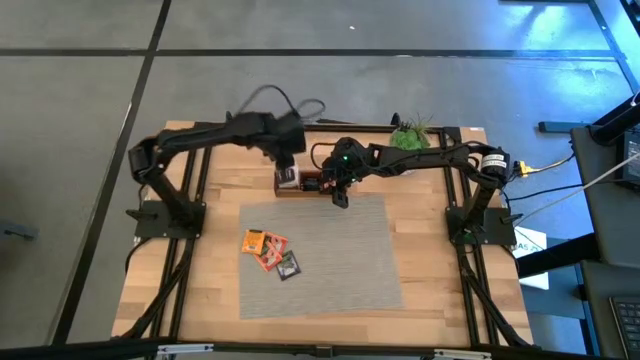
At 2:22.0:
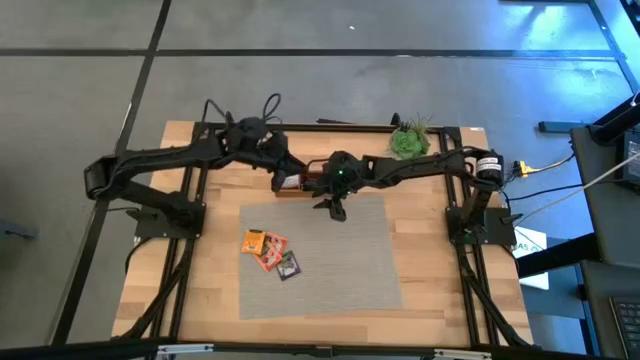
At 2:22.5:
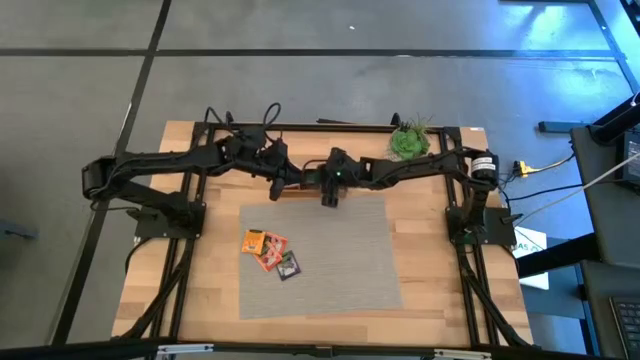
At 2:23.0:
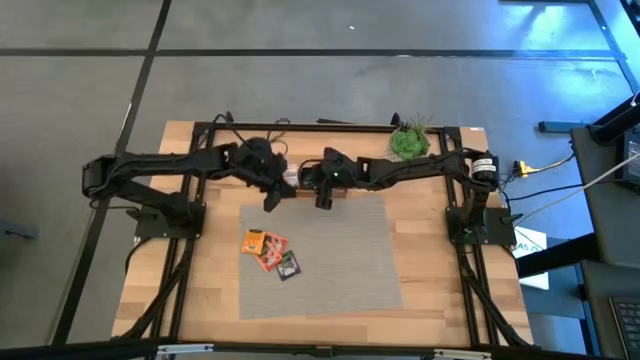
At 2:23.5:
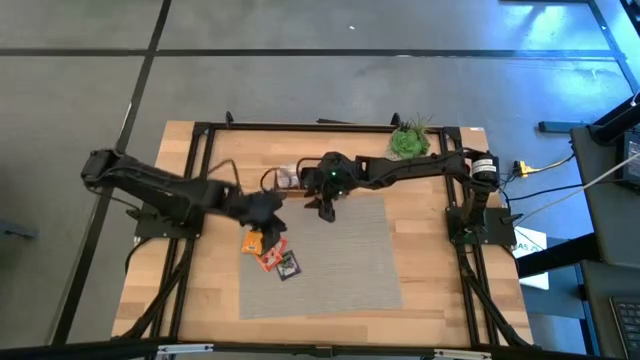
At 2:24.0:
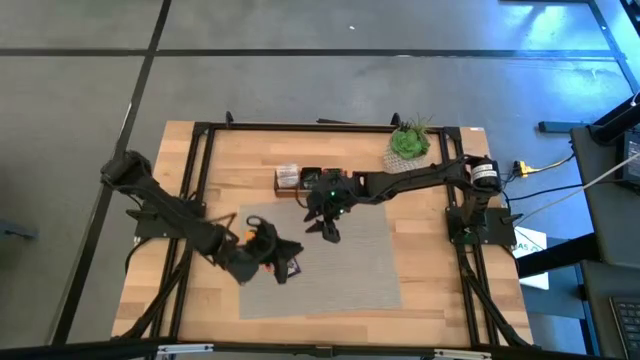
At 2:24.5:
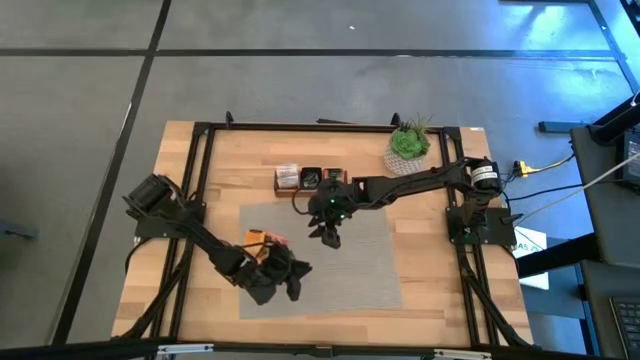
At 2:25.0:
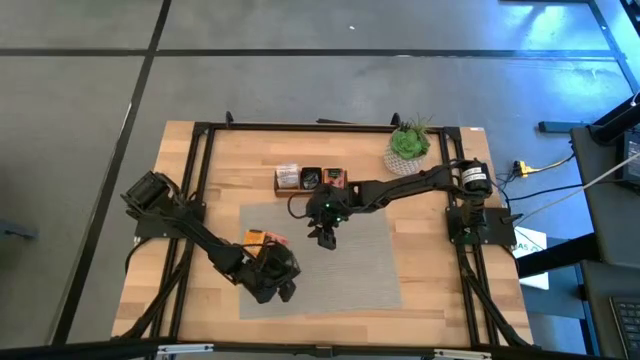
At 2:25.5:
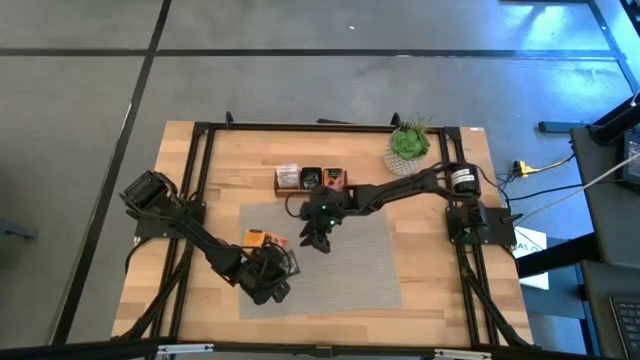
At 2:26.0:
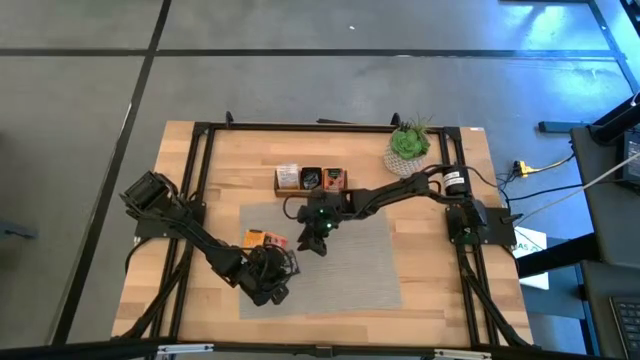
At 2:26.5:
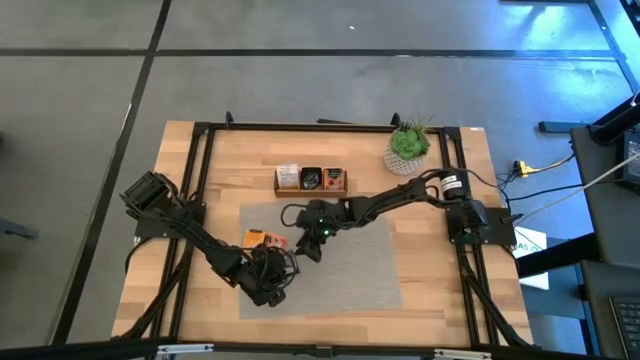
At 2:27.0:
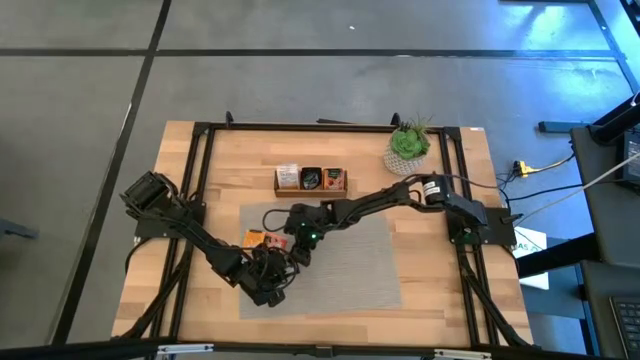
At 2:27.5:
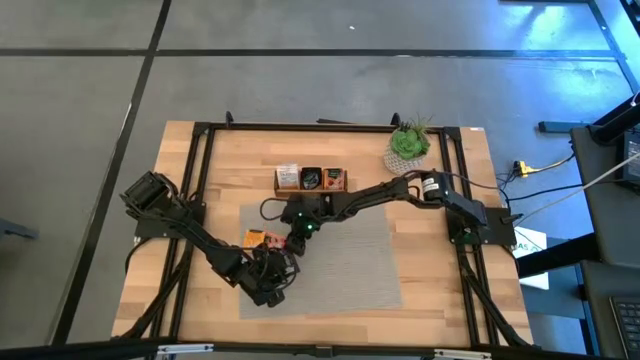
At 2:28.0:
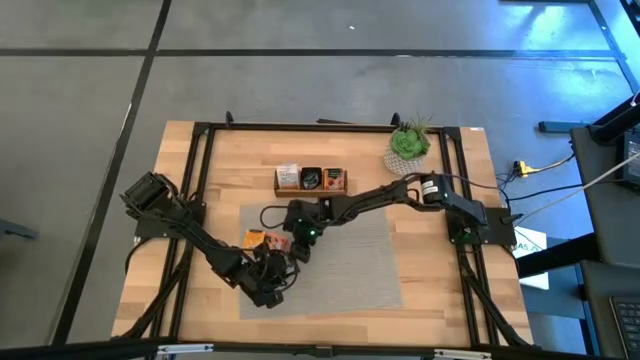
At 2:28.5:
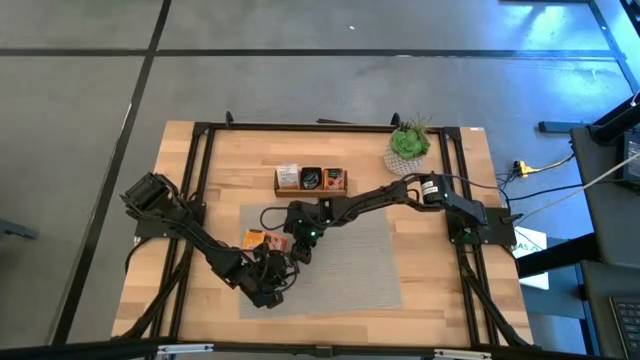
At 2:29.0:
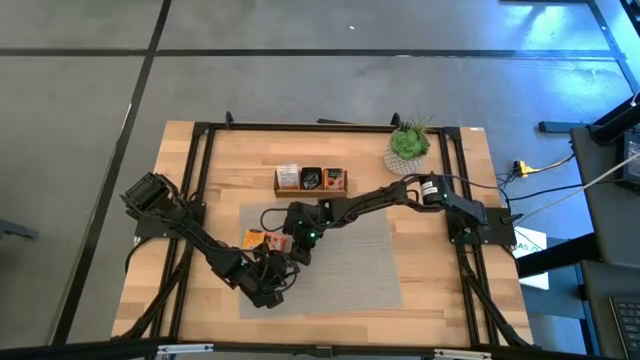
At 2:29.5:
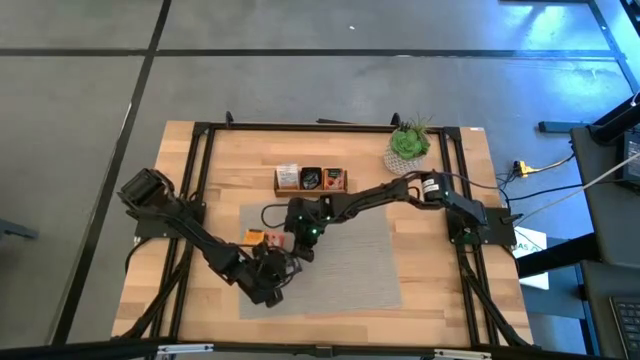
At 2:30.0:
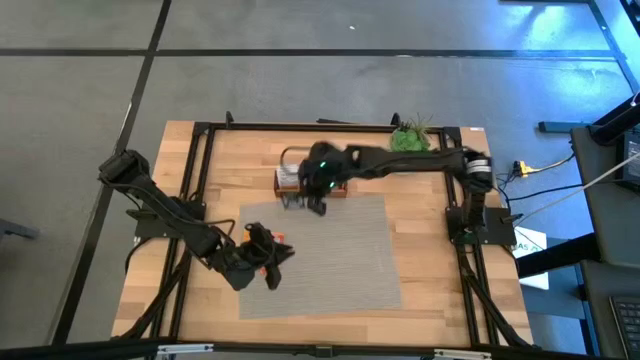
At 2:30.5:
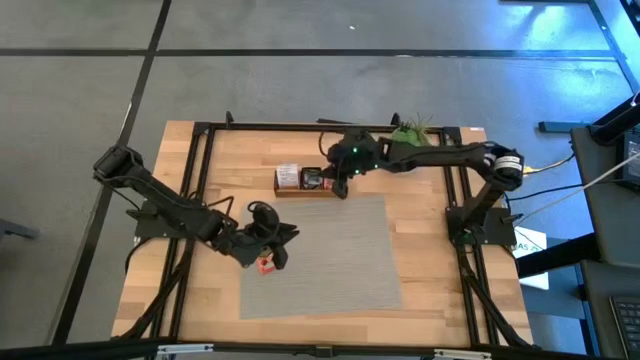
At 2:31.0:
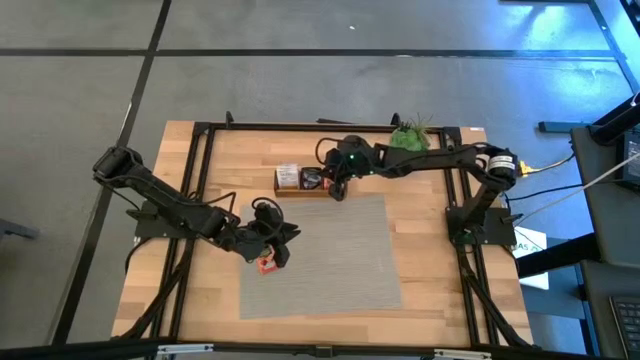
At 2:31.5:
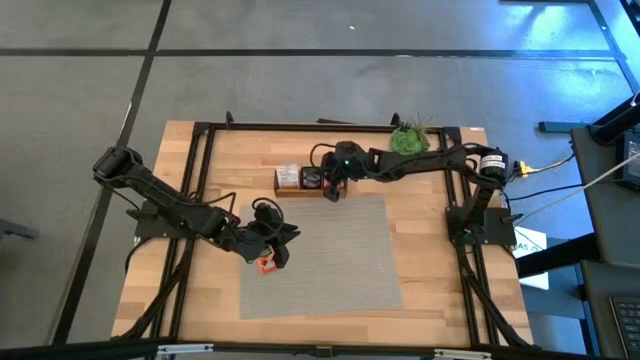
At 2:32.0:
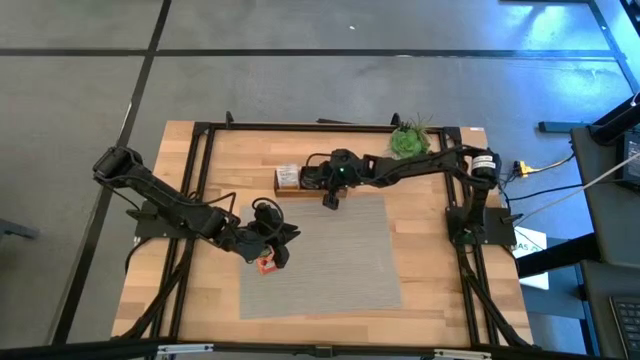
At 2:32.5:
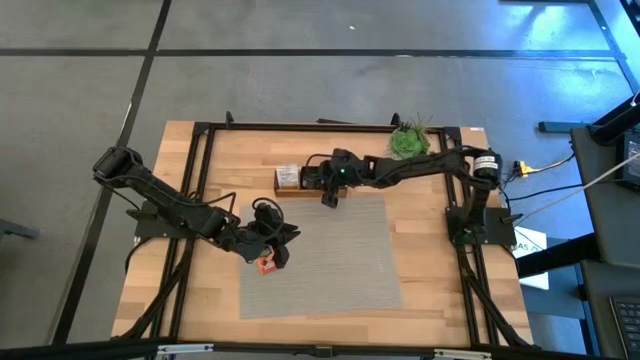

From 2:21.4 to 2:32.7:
Task: Pick & Place Tea
Put the blue tea bag into the middle section of the wooden organizer

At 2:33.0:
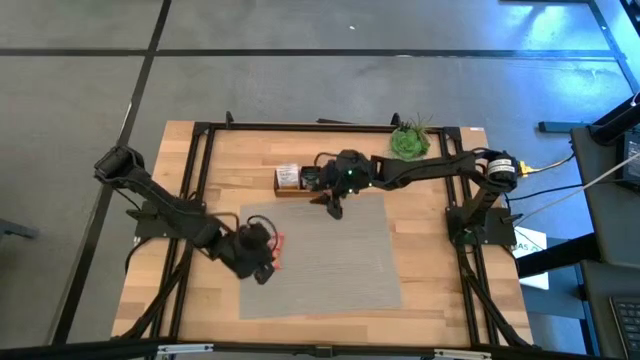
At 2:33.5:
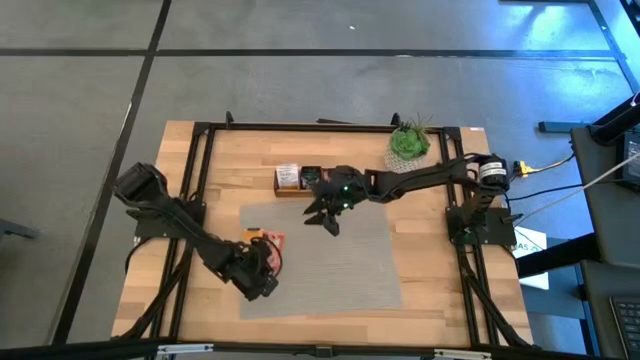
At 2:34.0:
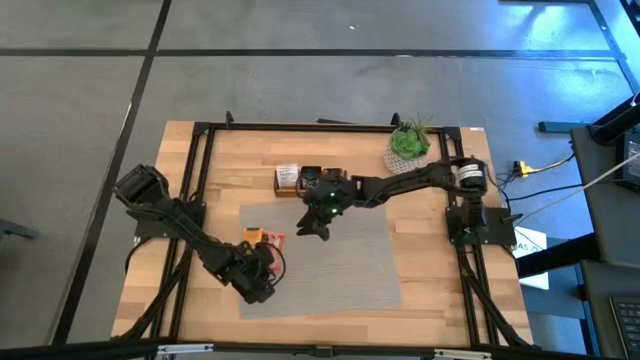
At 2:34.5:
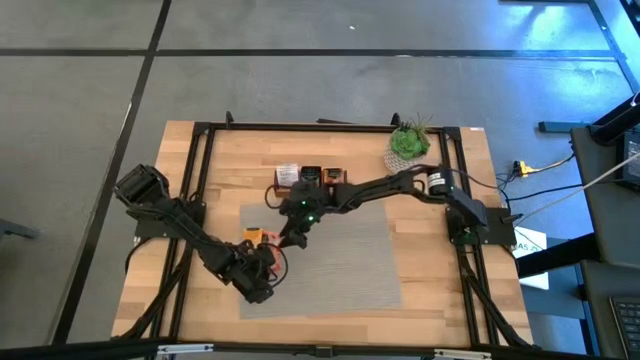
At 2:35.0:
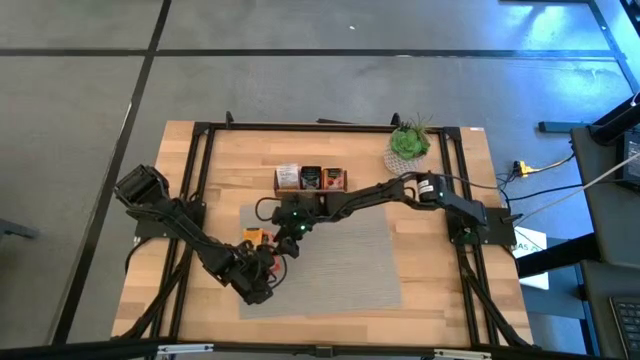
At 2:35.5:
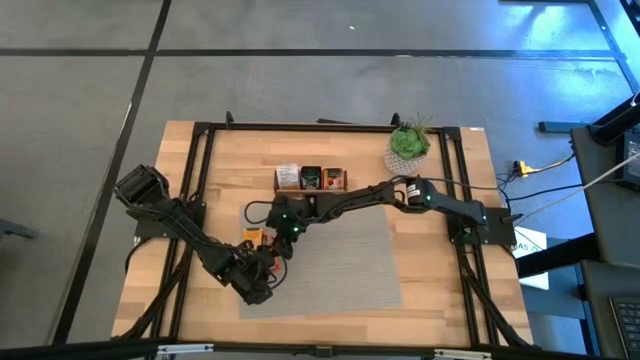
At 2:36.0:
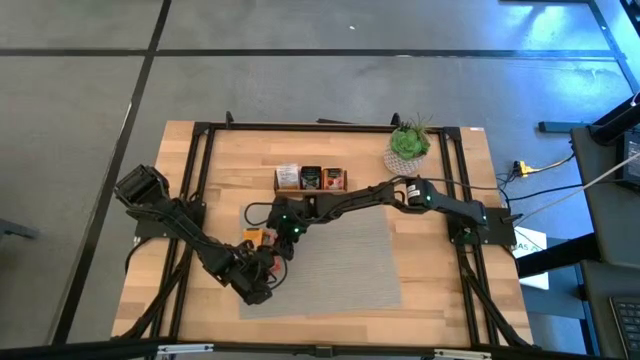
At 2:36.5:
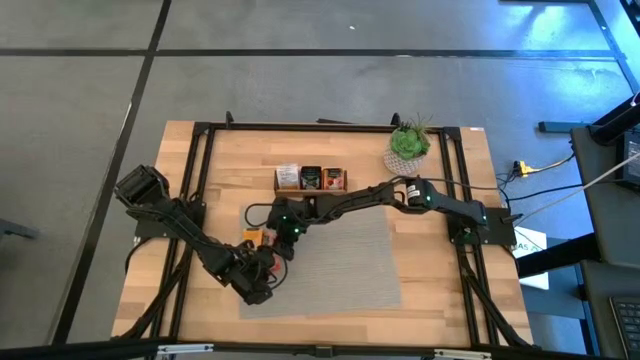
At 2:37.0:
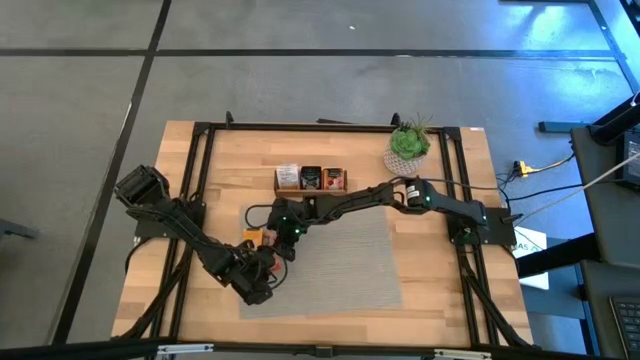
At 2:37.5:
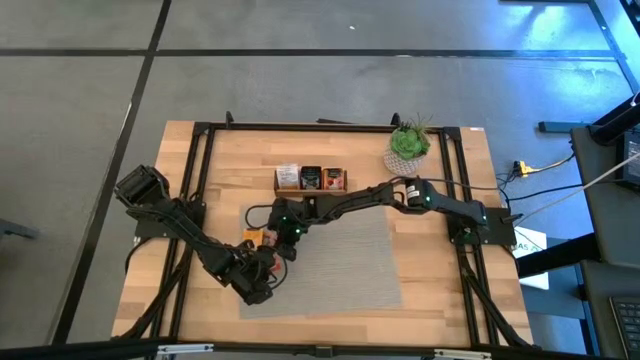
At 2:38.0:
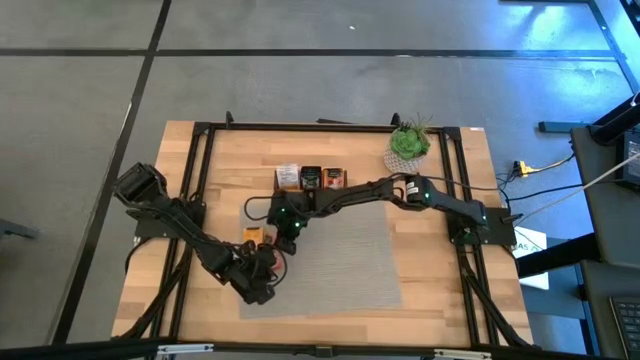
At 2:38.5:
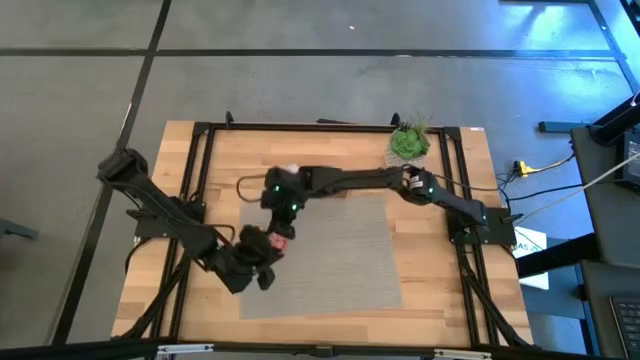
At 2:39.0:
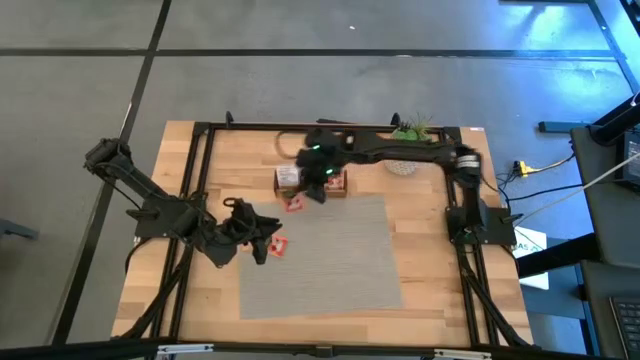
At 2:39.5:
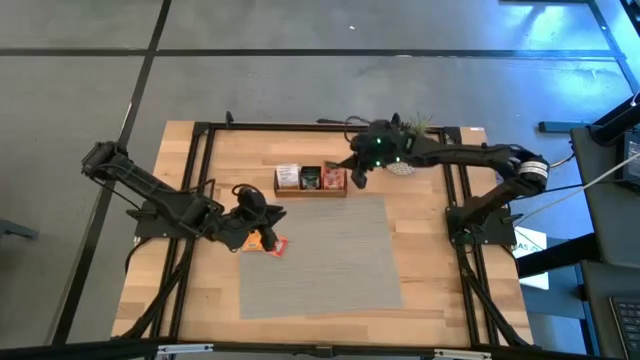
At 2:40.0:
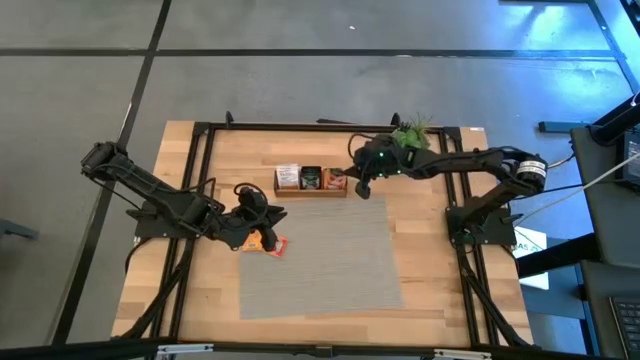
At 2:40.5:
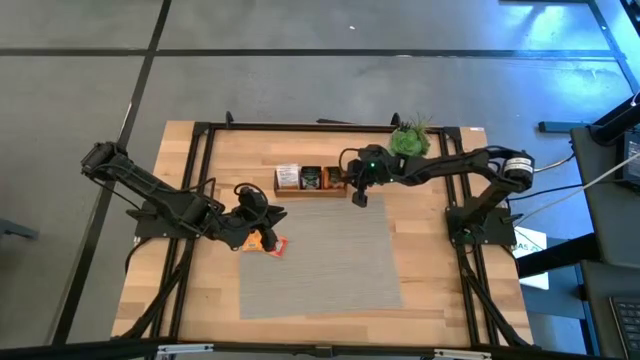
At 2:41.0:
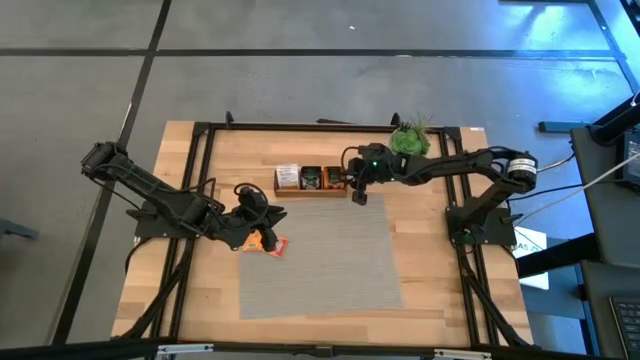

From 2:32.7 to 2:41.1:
Put the orange tea bag into the right section of the wooden organizer
